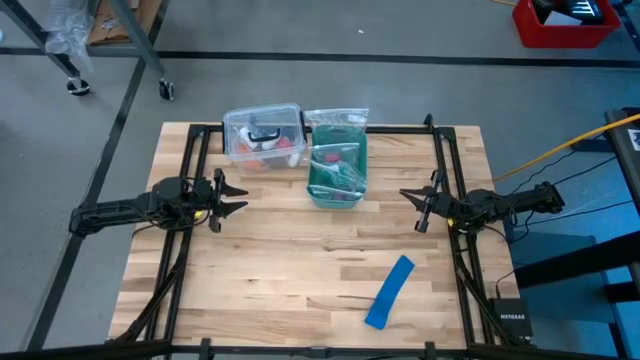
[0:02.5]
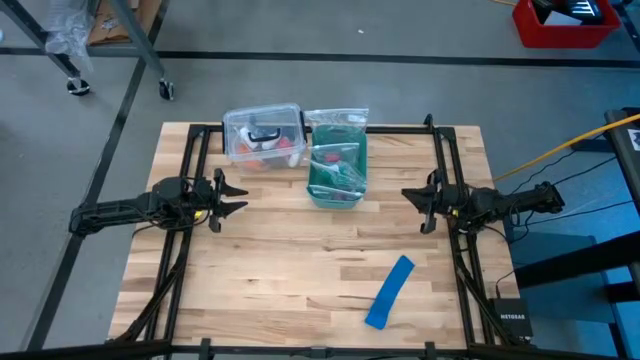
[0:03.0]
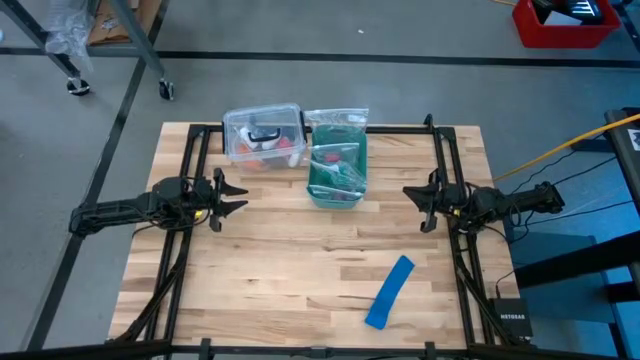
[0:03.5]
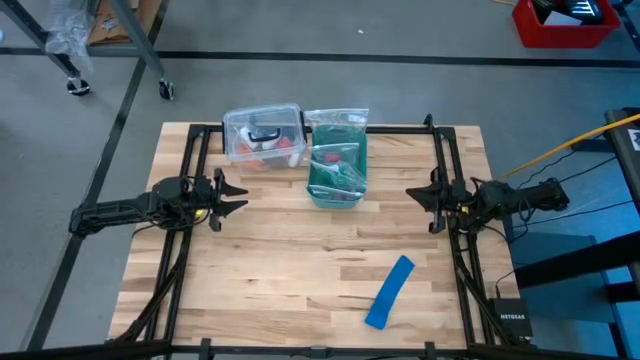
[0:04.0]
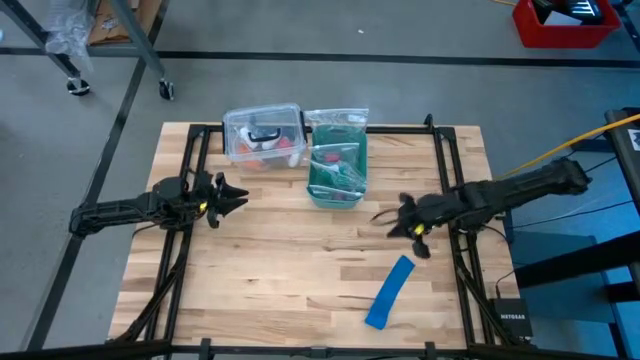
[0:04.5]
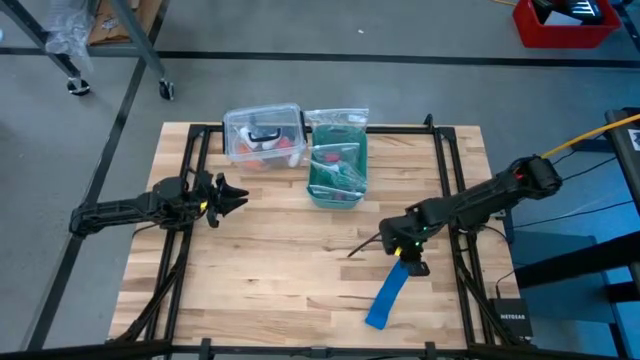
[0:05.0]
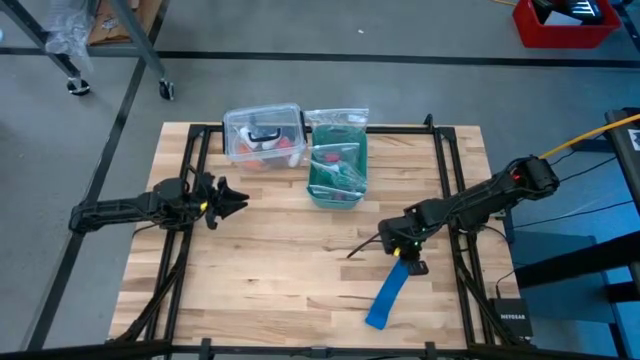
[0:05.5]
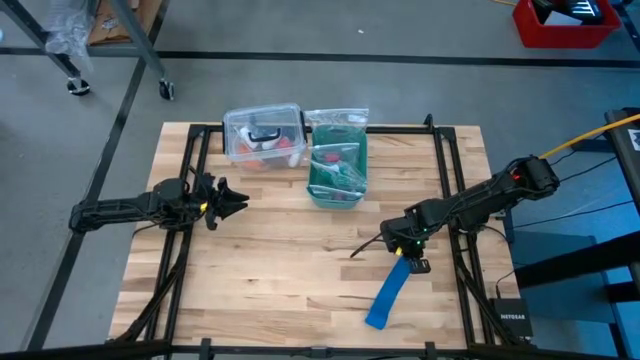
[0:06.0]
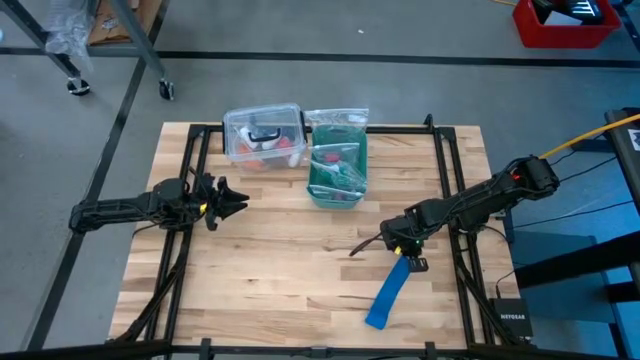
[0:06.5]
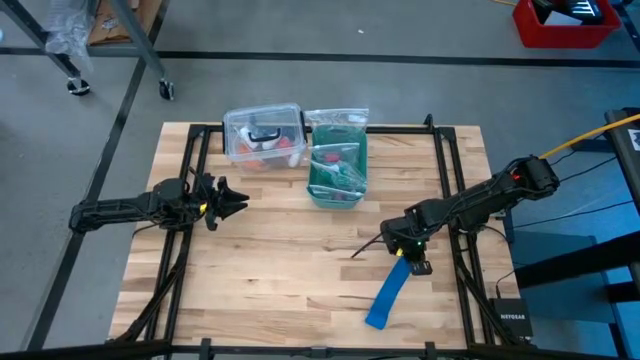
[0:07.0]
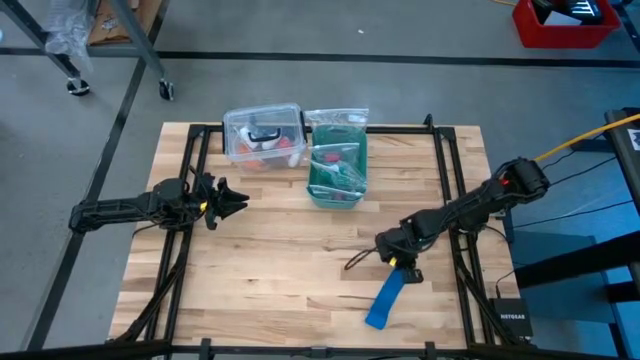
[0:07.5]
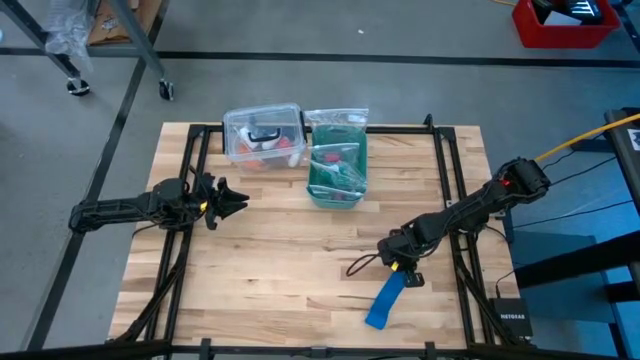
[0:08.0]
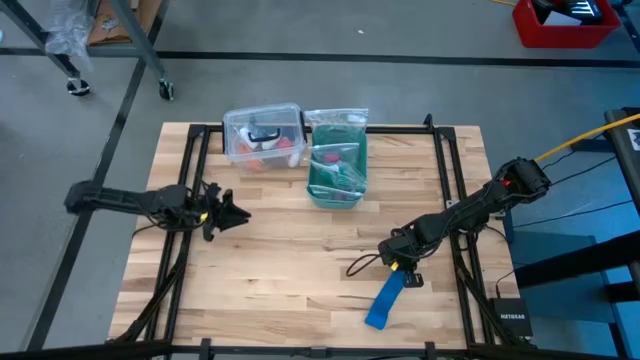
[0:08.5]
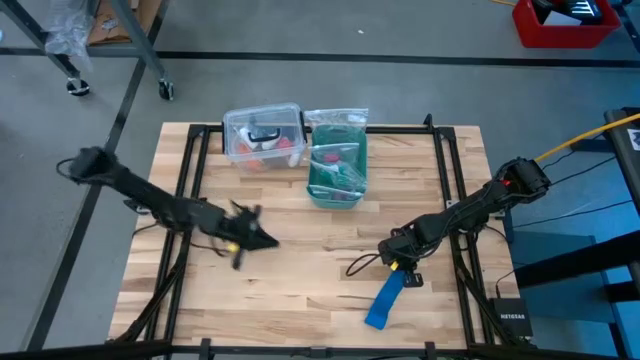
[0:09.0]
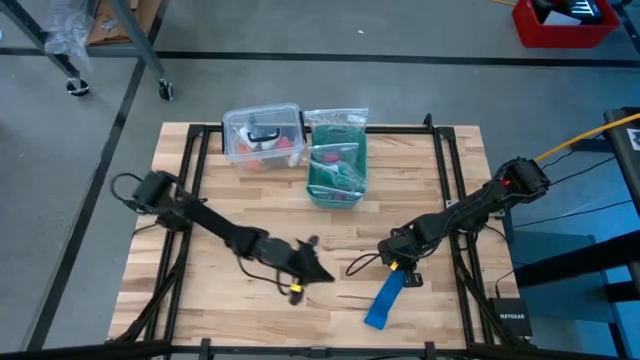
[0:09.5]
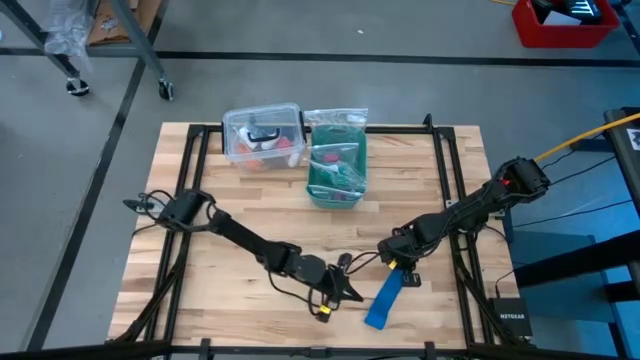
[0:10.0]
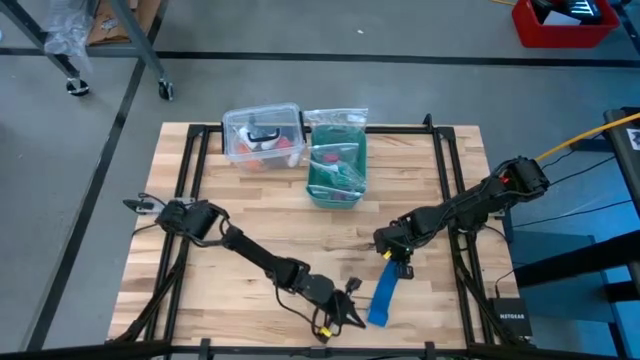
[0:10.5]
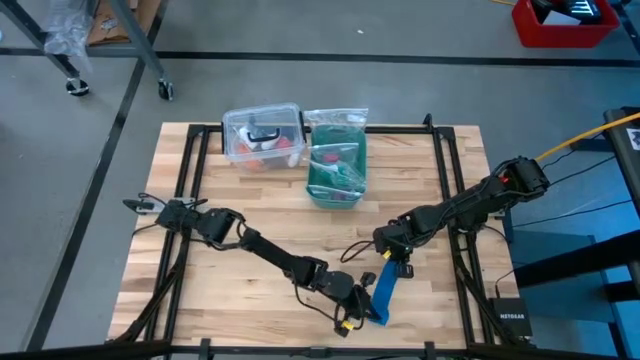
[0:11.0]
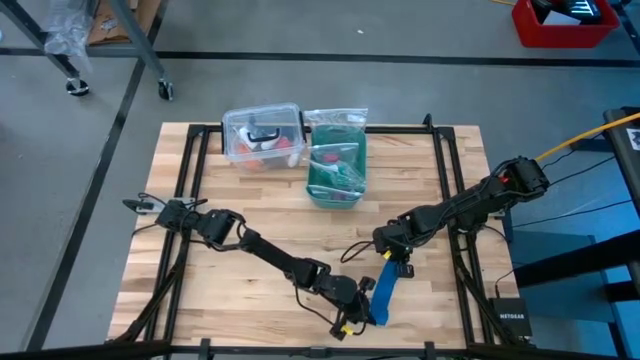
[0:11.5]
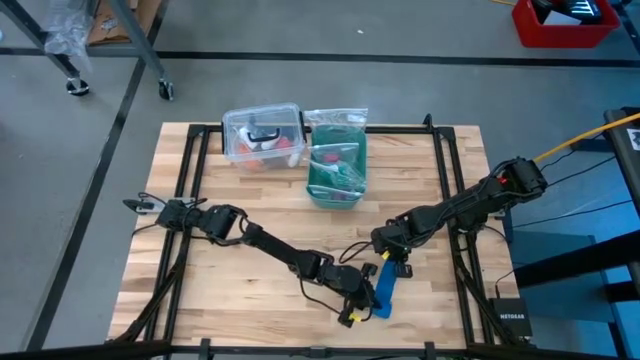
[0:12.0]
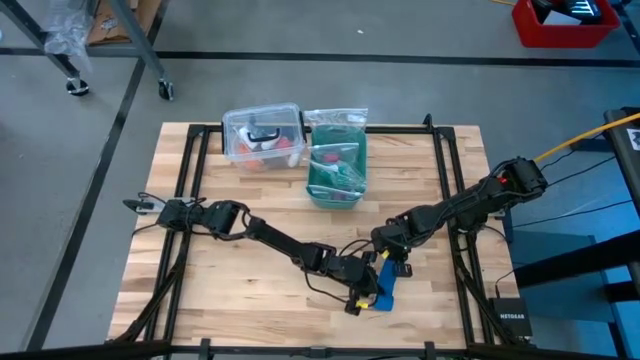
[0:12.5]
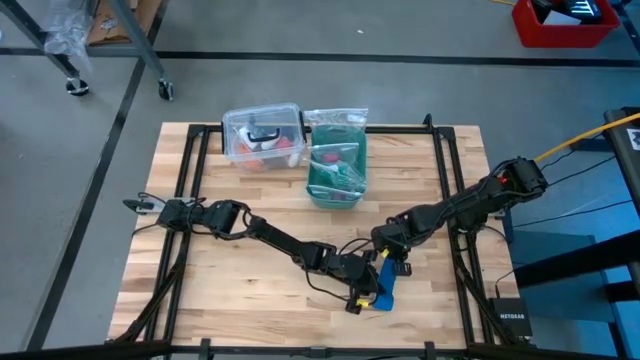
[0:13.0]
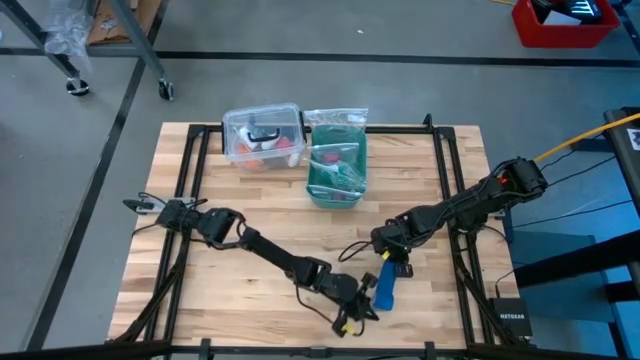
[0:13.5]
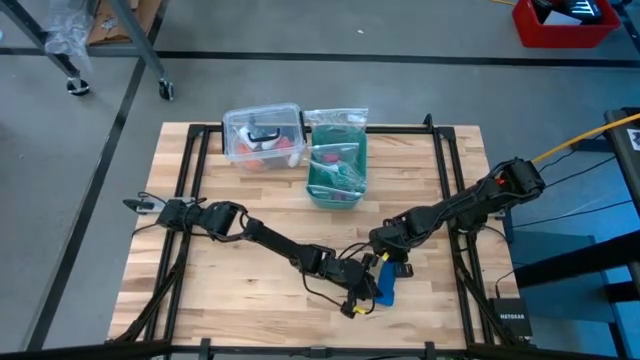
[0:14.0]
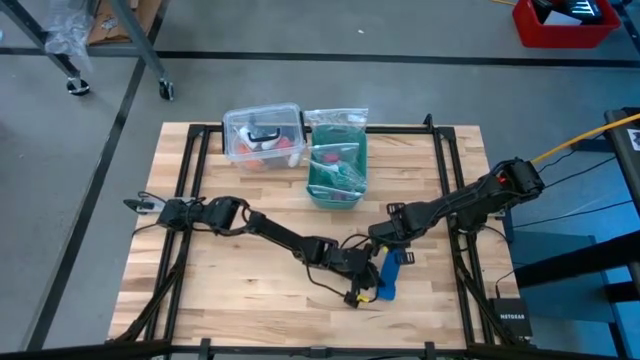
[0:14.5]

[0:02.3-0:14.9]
Task: Roll bandage
Roll the blue bandage

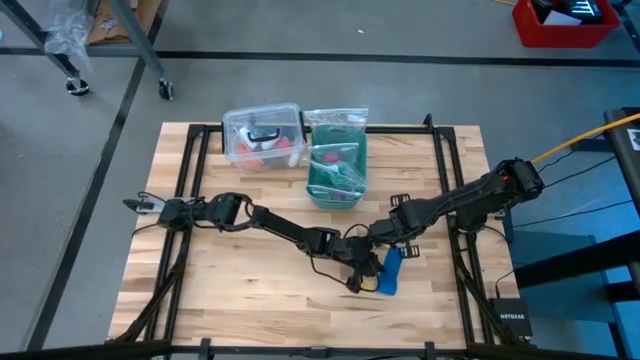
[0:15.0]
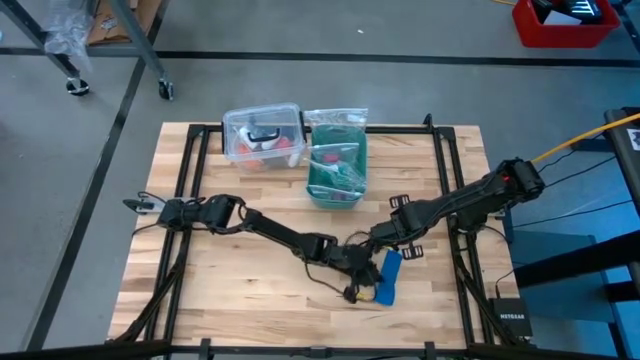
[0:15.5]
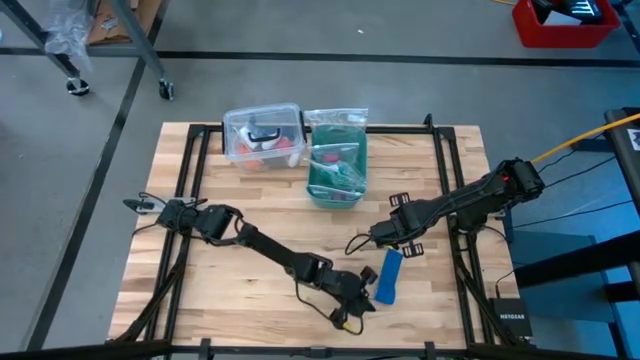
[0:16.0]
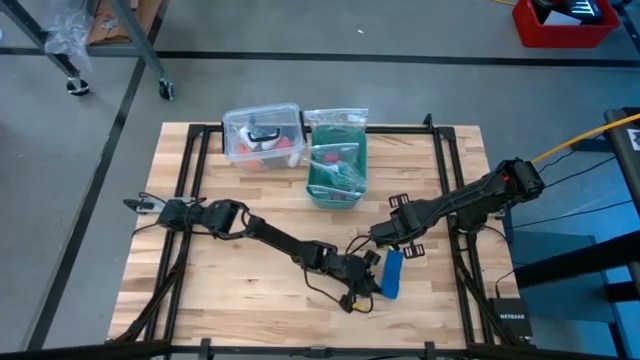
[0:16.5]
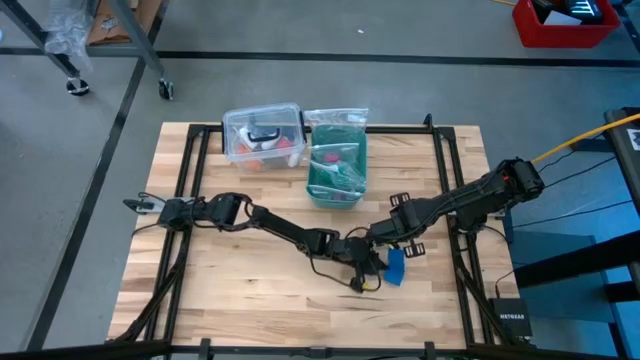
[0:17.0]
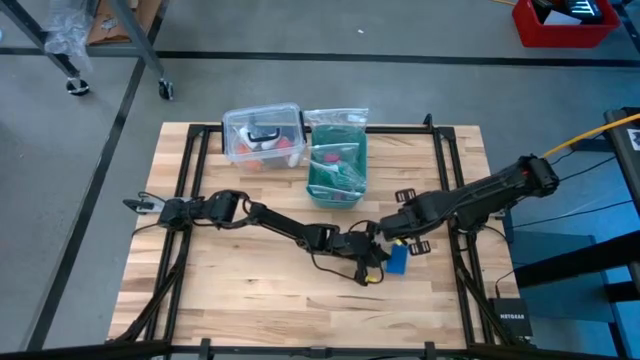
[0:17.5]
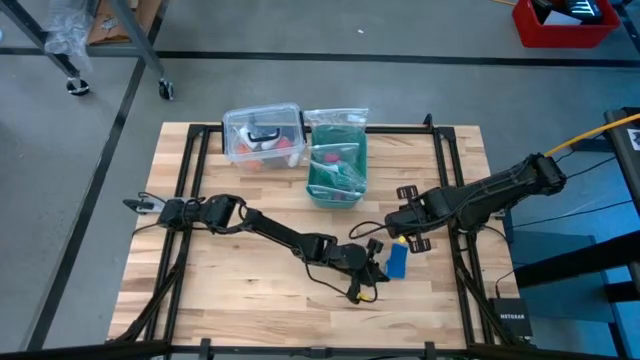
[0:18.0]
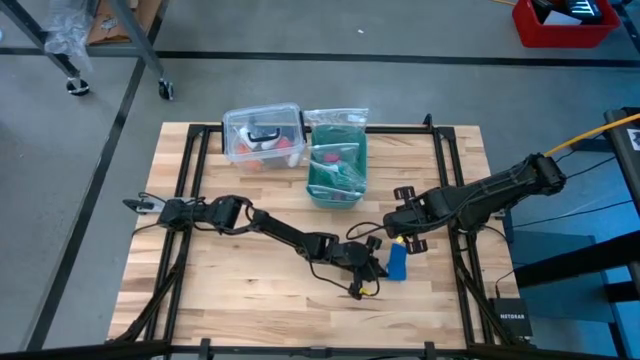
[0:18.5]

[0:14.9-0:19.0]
Roll the blue bandage
